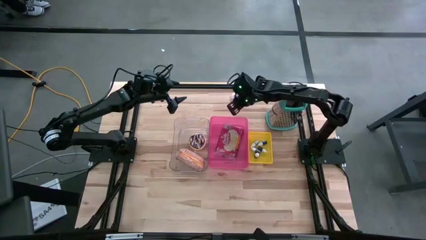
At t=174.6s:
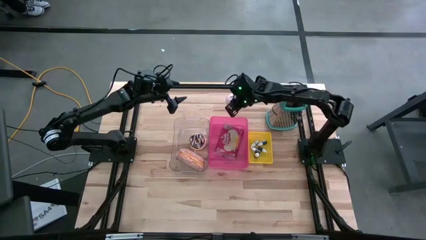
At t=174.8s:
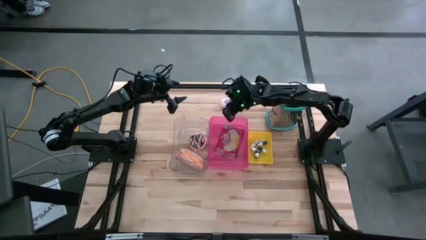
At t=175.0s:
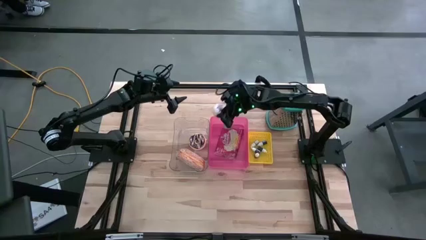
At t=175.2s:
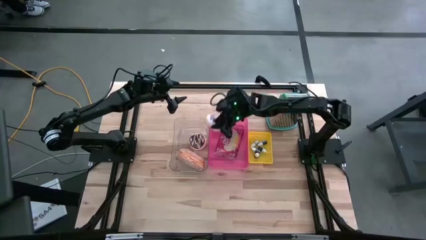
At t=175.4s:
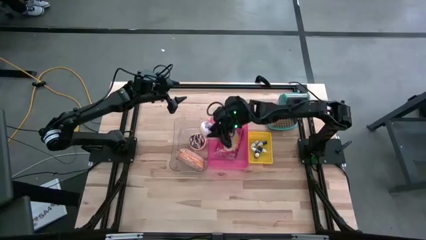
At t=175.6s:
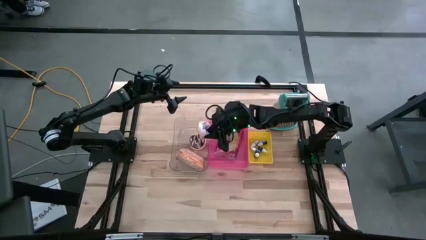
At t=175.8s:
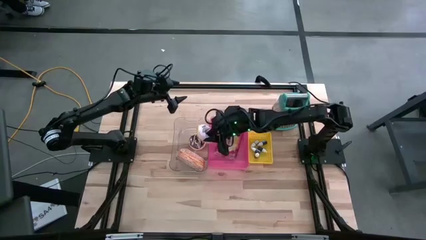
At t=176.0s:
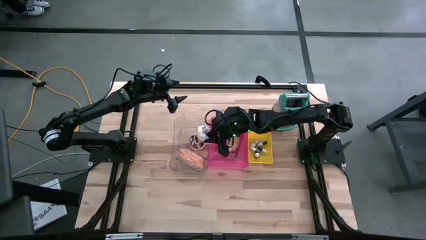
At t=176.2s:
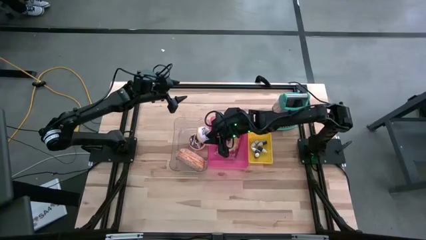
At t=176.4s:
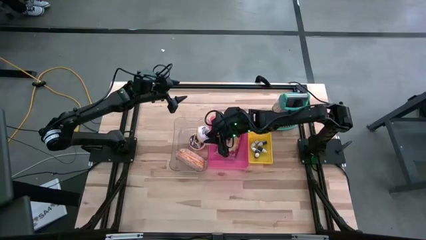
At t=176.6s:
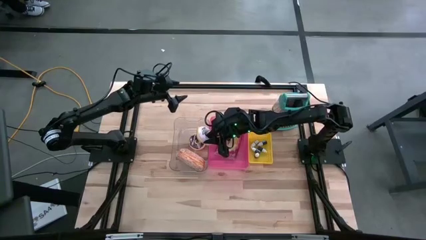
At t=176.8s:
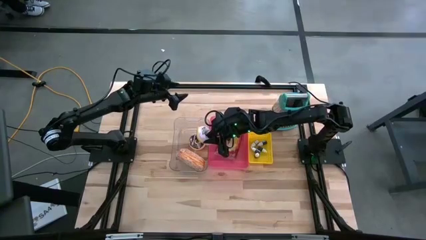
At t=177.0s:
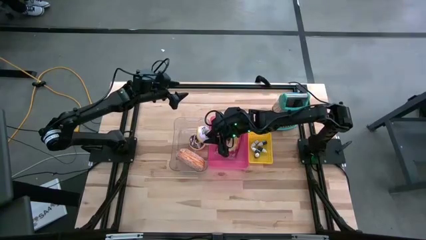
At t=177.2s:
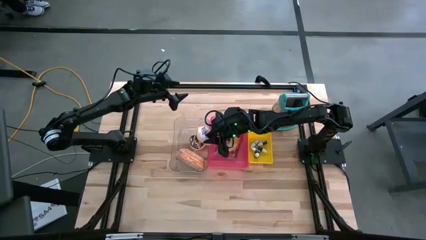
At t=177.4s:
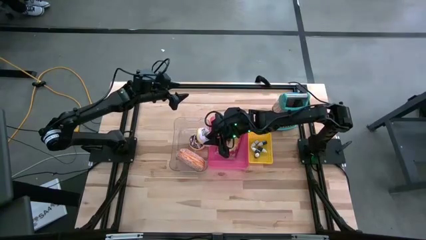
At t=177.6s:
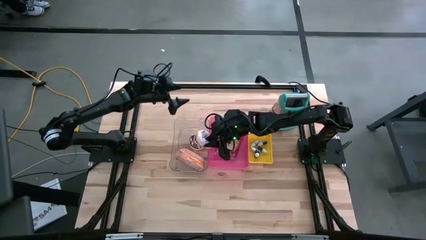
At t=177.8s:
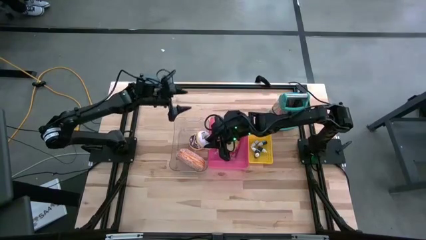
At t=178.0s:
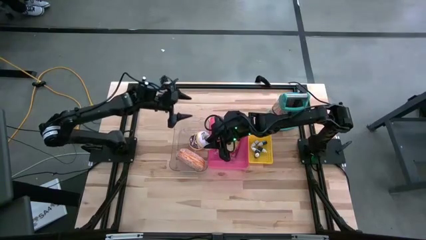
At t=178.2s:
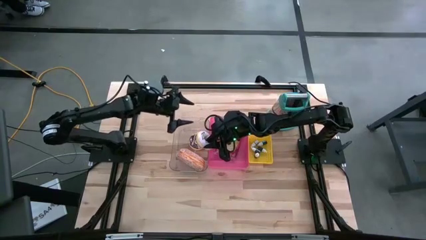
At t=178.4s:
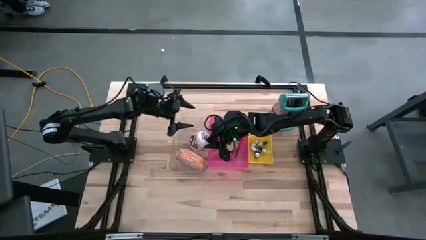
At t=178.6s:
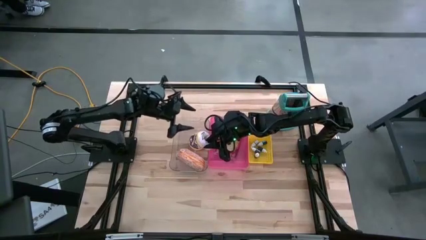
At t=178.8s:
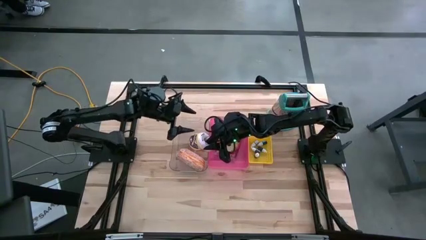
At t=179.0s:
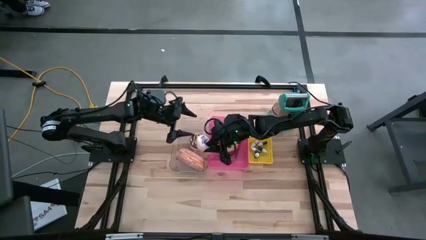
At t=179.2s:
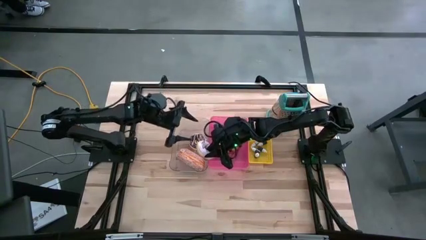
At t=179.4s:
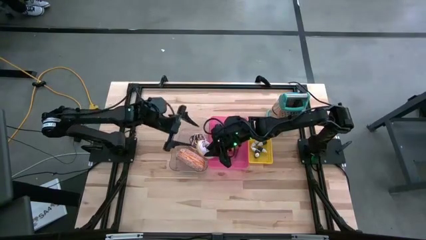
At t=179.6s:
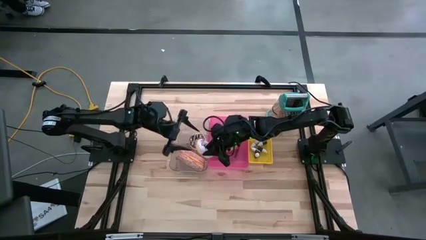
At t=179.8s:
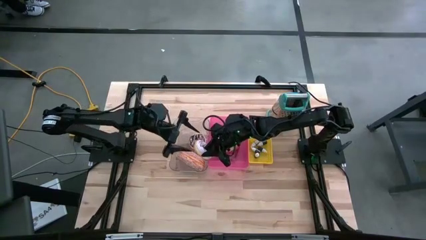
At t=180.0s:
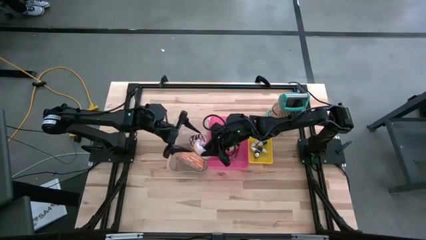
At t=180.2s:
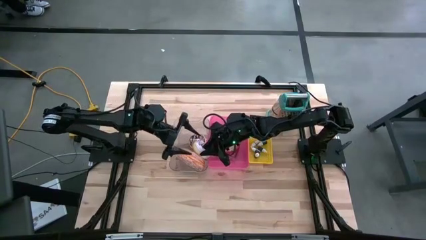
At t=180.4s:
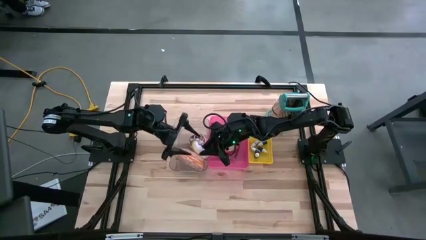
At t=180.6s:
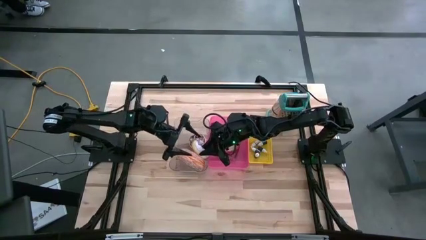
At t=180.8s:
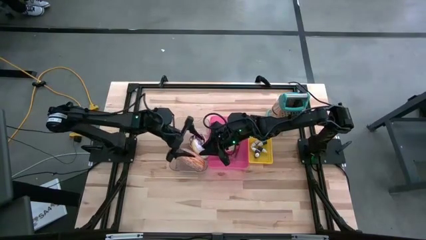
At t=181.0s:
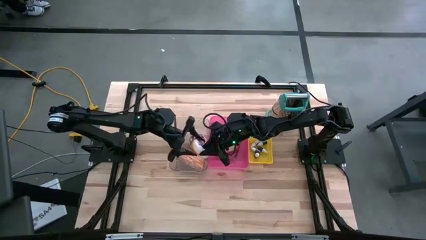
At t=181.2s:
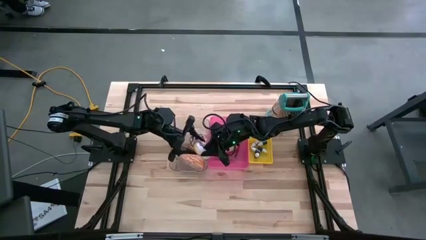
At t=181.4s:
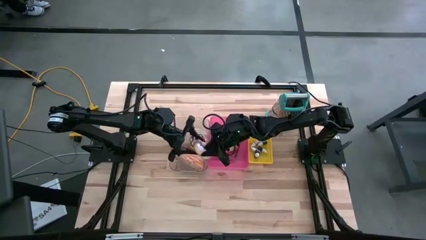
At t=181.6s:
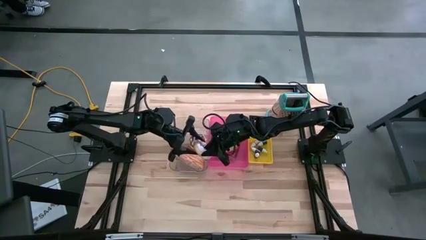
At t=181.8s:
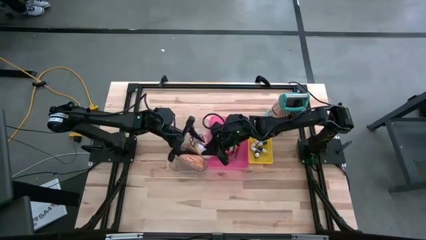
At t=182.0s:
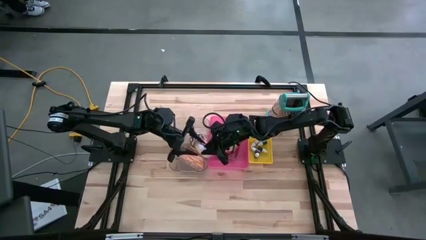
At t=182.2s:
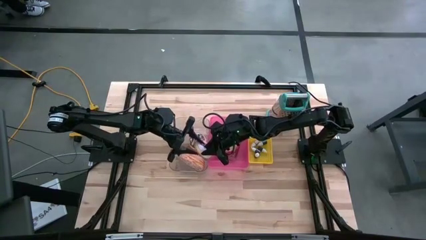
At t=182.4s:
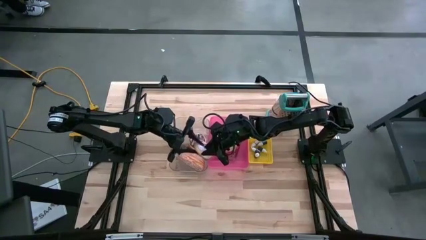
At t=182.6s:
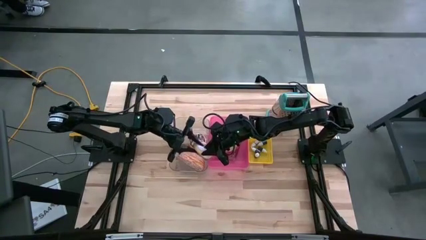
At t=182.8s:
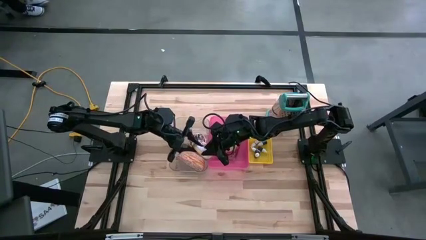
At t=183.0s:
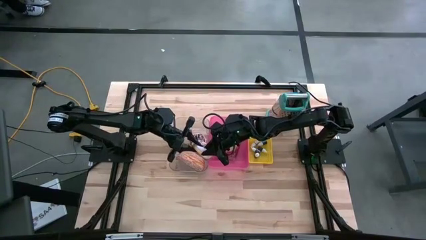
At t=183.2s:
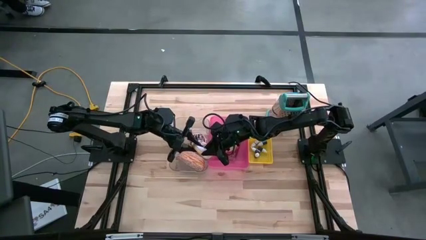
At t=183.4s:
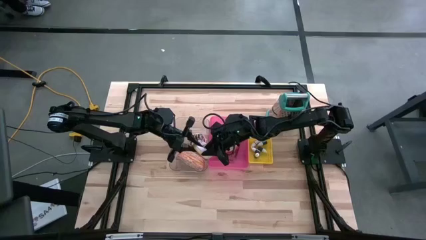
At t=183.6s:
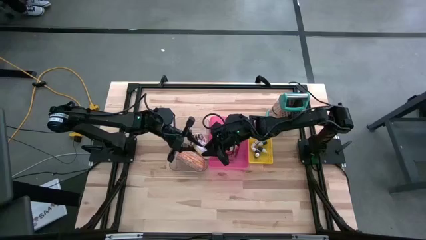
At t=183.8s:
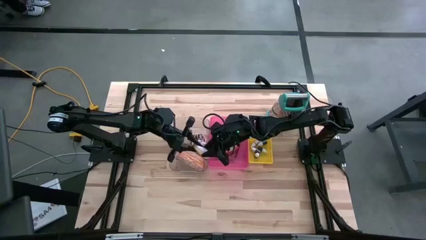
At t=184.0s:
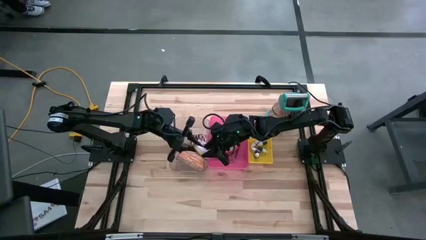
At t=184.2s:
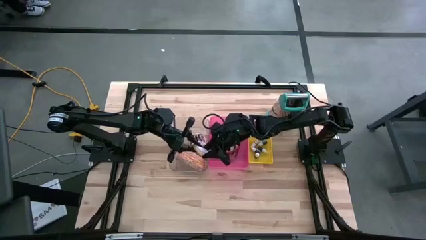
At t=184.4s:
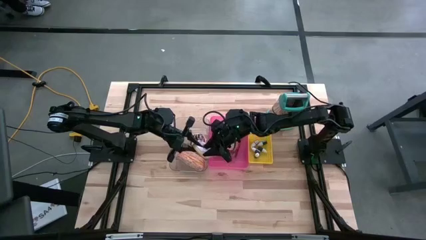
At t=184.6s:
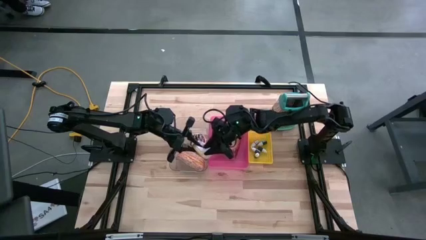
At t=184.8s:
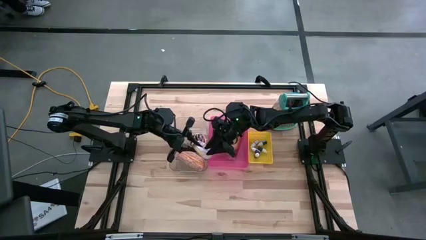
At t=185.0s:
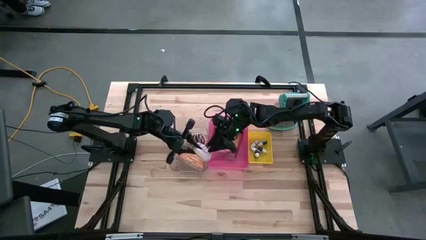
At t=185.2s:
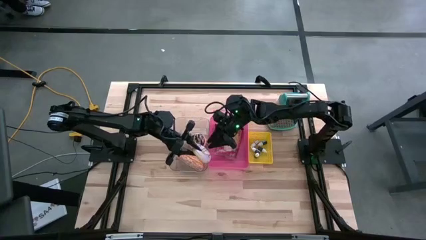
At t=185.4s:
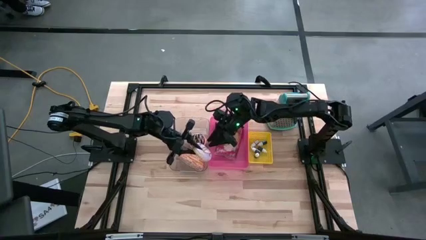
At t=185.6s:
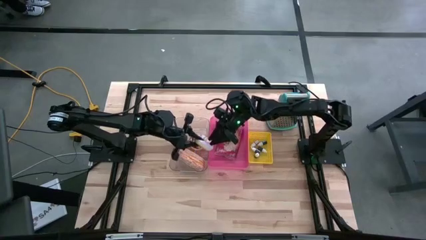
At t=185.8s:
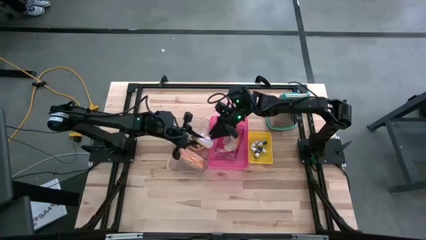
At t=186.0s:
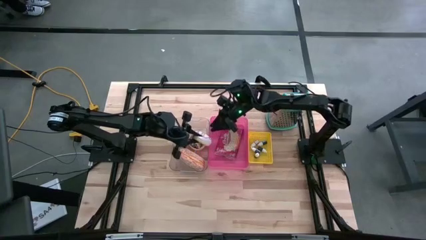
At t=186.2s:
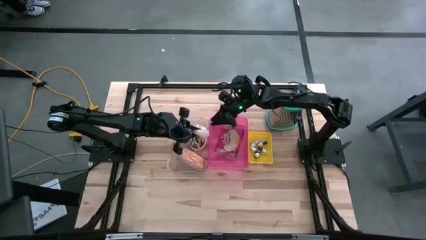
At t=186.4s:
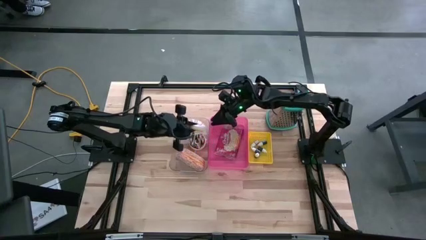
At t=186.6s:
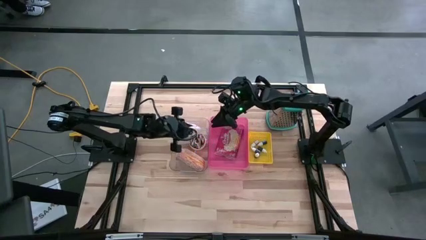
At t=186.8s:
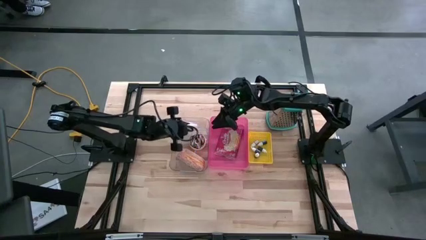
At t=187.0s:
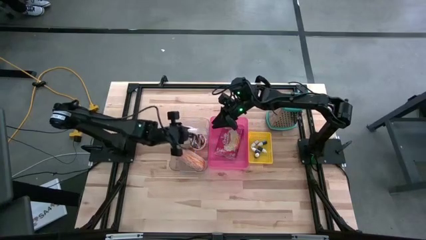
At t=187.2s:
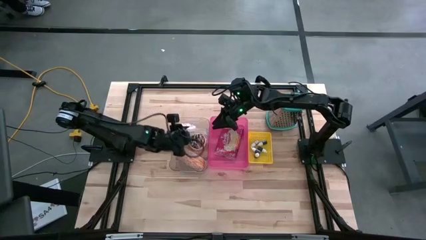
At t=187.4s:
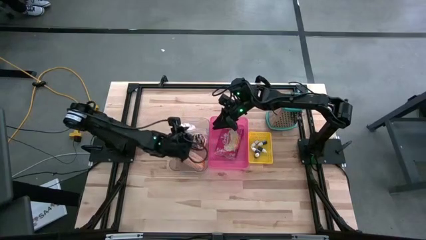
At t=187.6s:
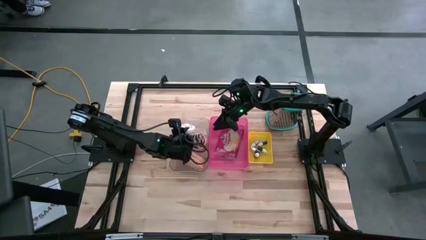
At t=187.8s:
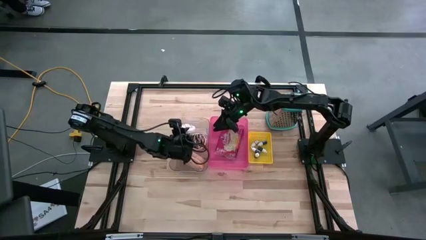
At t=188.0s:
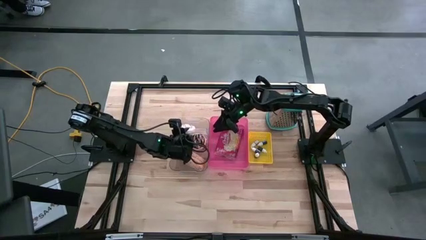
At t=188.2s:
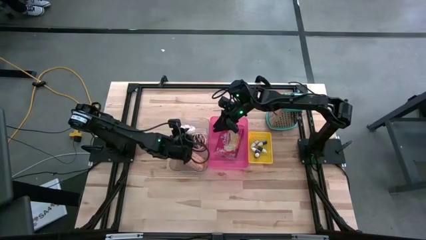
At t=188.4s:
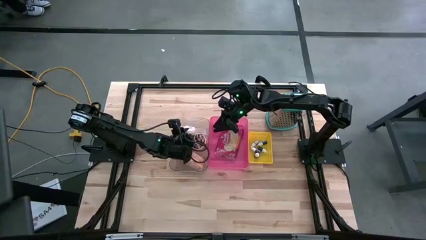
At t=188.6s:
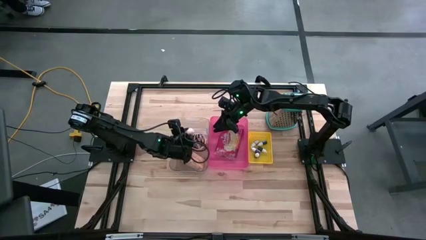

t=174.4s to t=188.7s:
Put the white donut into the transparent bin
